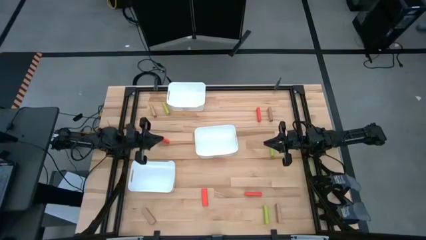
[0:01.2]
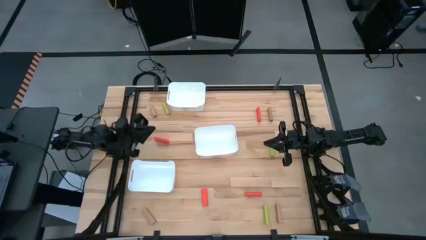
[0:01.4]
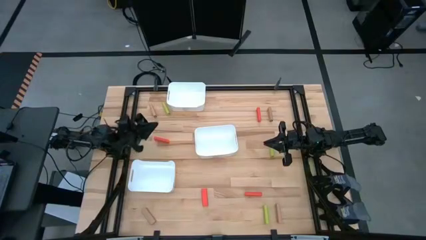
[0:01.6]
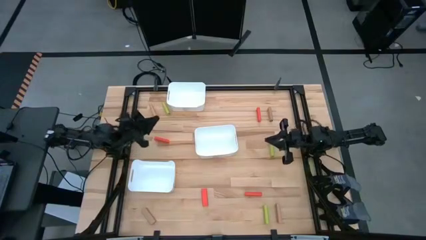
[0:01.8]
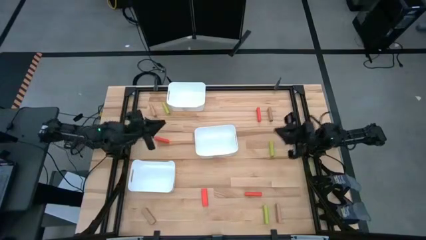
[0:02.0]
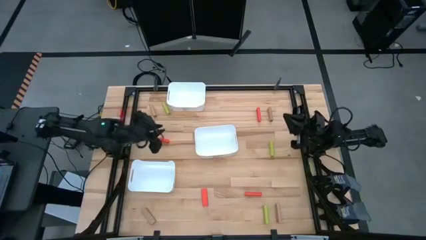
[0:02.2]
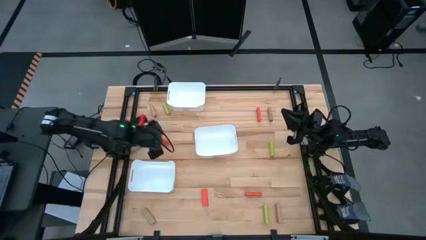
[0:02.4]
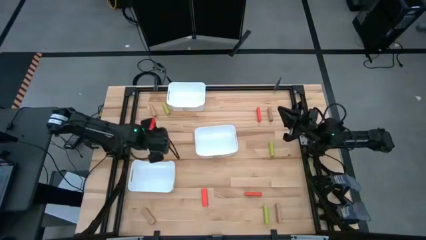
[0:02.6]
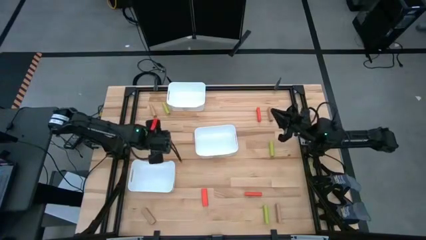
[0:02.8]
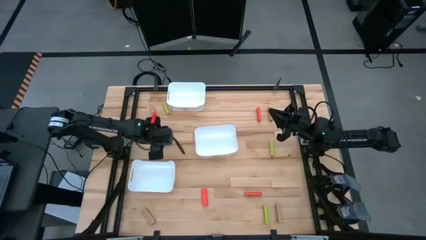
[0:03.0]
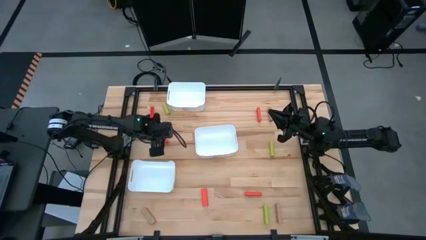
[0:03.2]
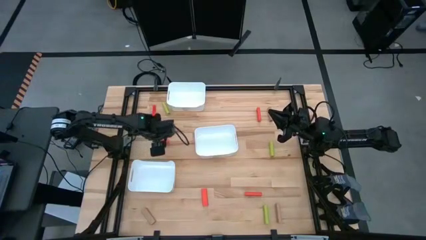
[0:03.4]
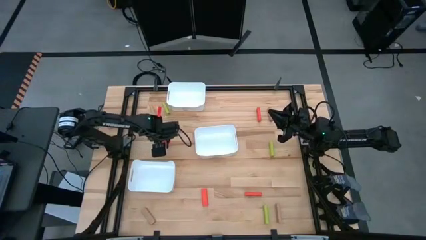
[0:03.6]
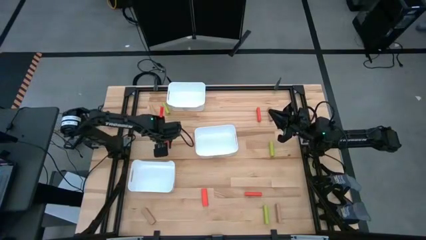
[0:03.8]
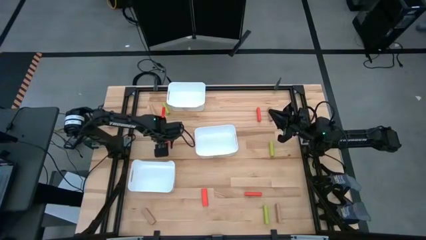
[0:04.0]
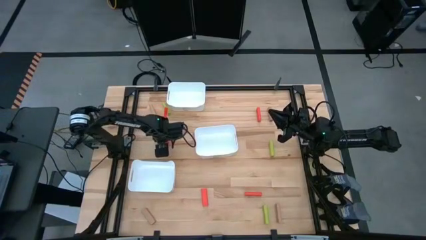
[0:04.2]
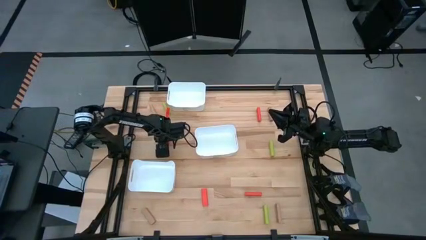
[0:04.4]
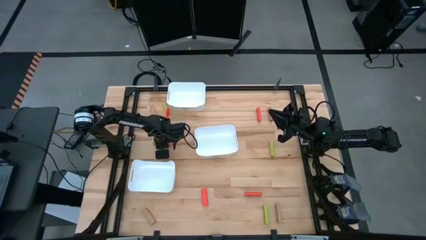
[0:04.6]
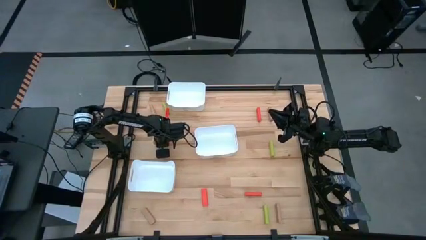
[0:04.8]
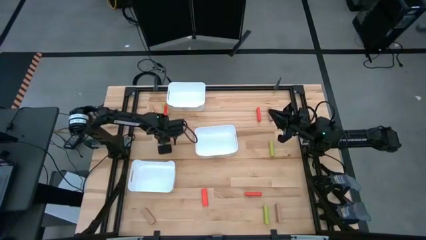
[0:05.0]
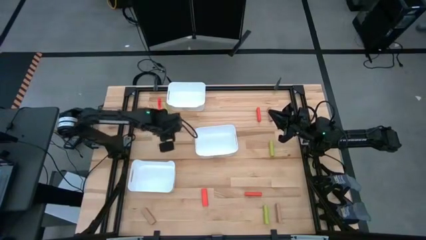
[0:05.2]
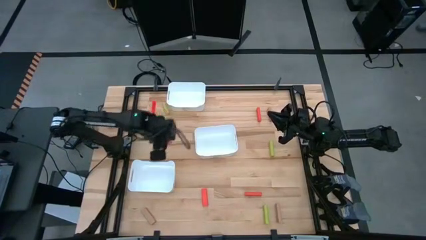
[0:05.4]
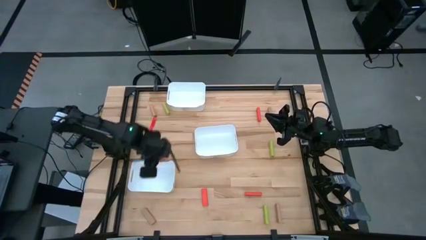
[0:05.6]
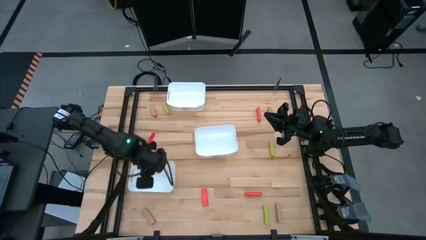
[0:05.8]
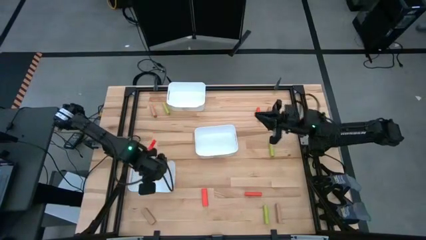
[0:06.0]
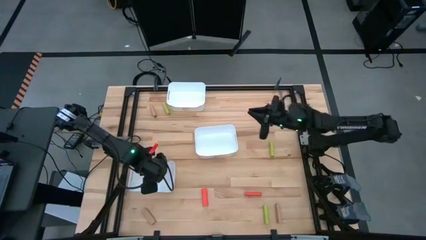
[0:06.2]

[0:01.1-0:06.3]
Task: Sort blocks
Put the orange block into the bottom white bin

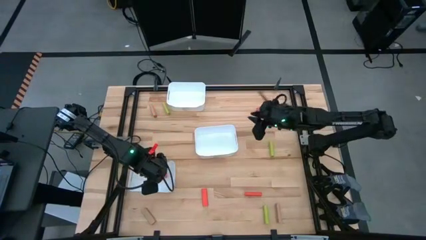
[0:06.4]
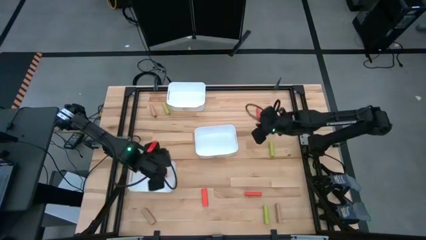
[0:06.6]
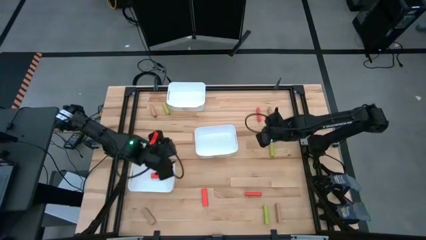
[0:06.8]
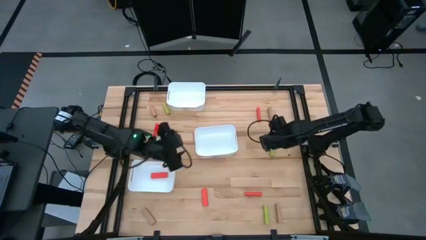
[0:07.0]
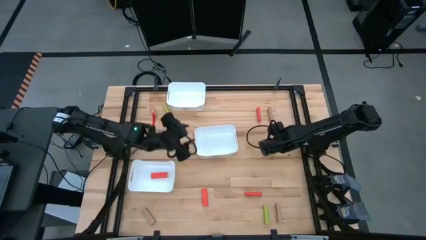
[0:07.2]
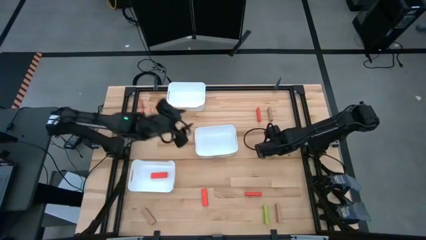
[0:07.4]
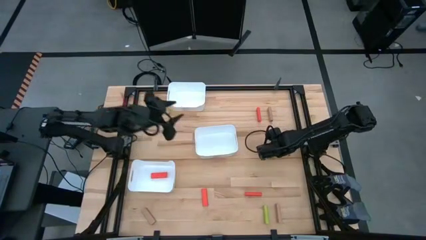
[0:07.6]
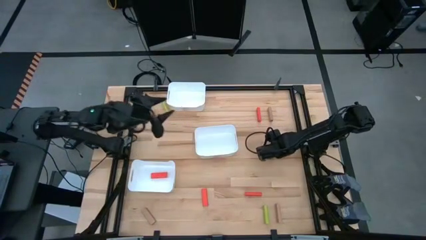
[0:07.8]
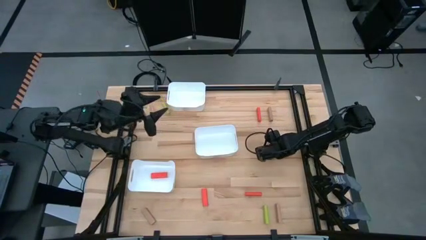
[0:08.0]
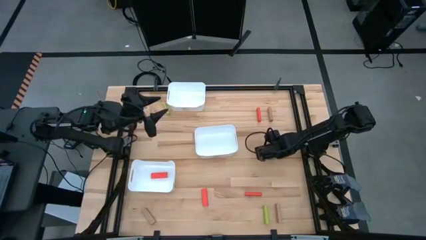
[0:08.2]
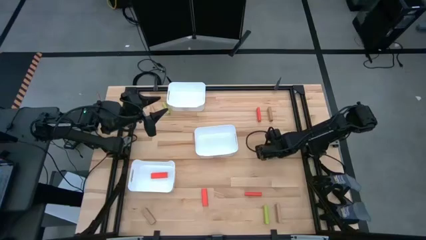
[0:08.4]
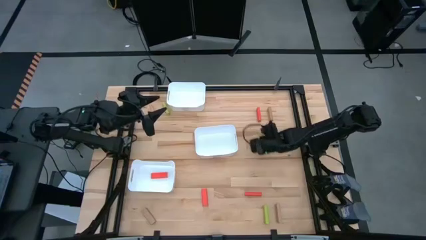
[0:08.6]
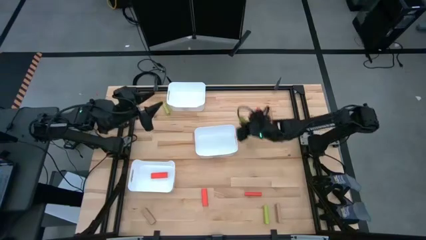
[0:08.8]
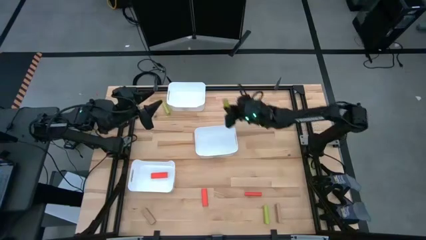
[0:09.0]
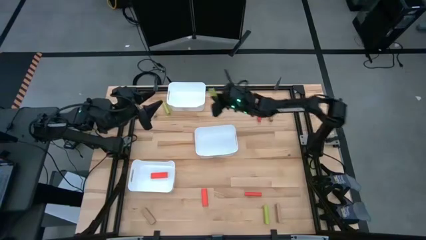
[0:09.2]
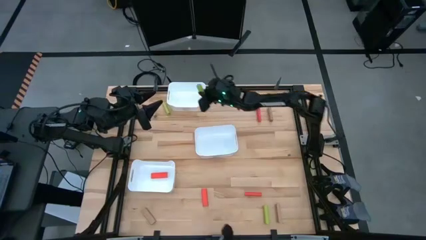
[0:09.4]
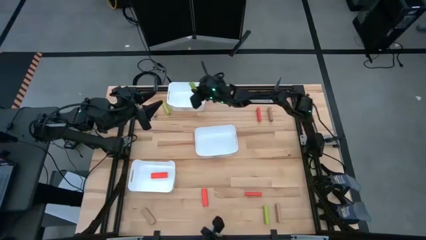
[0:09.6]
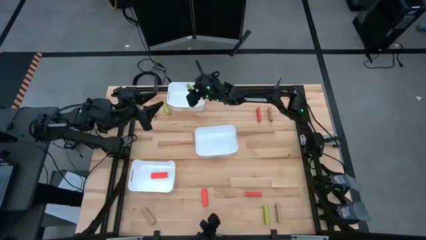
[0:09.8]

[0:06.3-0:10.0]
Put the green block into the top white bin

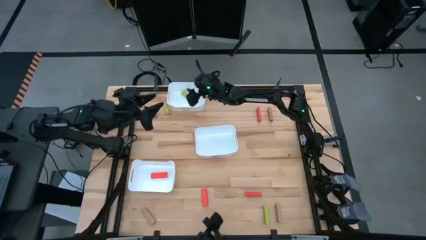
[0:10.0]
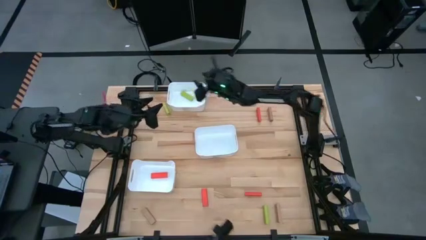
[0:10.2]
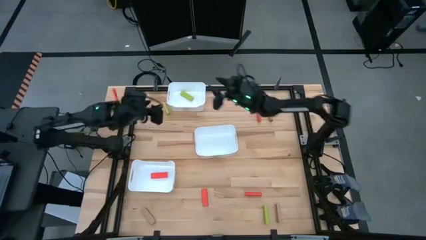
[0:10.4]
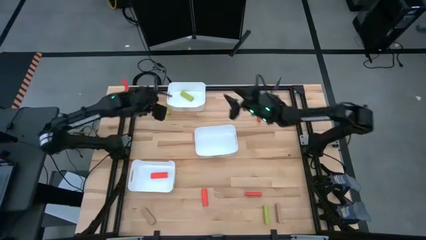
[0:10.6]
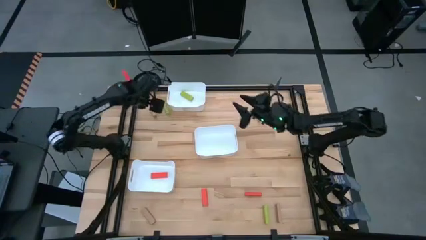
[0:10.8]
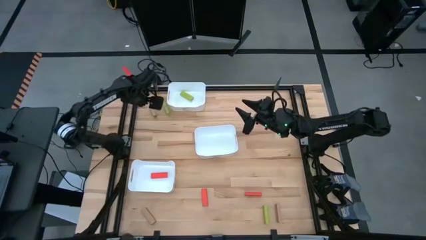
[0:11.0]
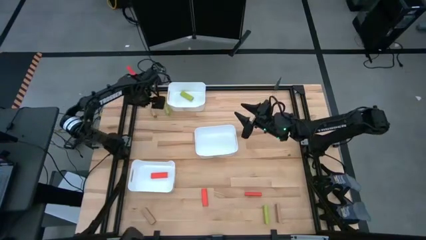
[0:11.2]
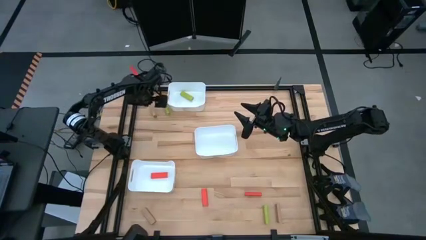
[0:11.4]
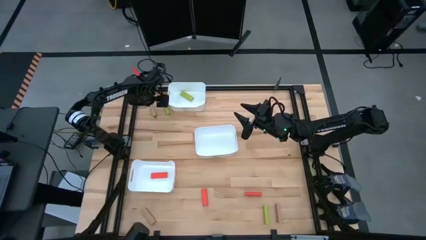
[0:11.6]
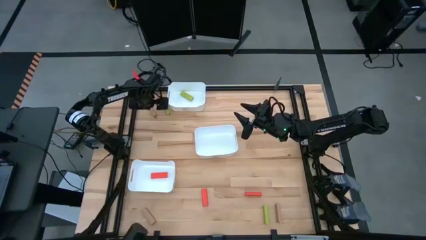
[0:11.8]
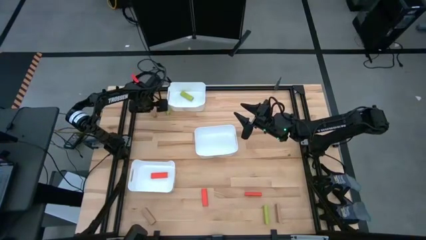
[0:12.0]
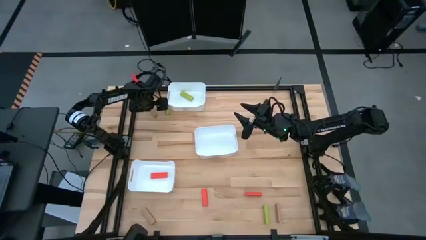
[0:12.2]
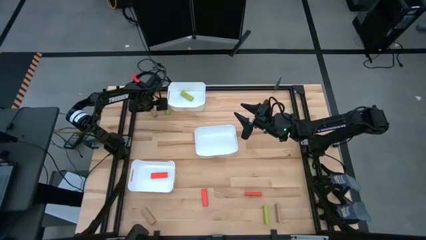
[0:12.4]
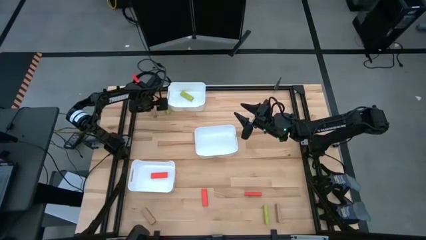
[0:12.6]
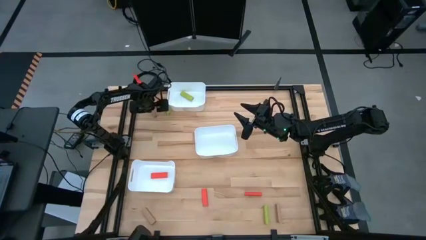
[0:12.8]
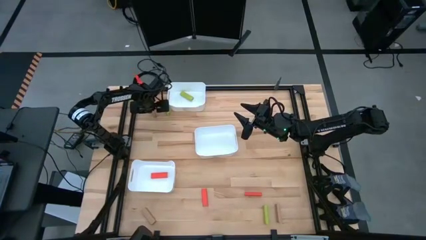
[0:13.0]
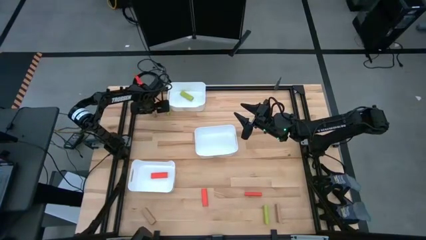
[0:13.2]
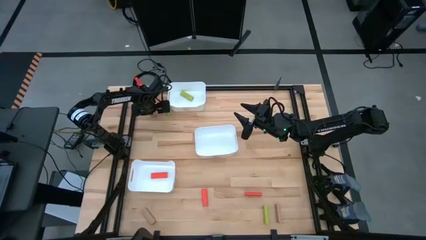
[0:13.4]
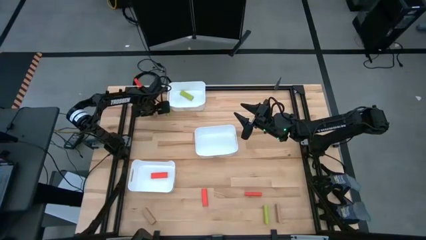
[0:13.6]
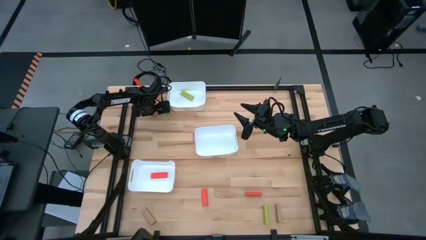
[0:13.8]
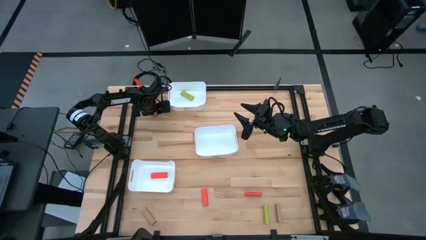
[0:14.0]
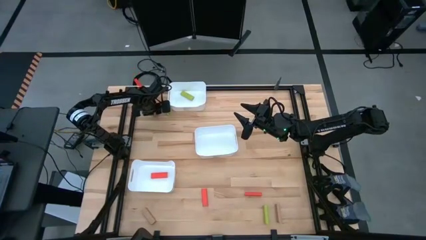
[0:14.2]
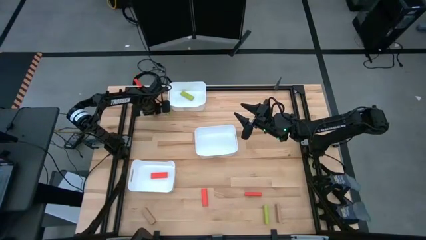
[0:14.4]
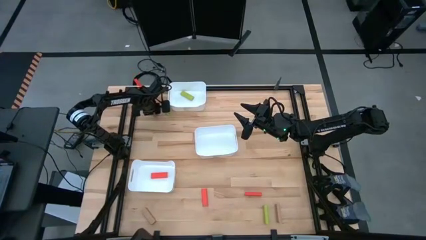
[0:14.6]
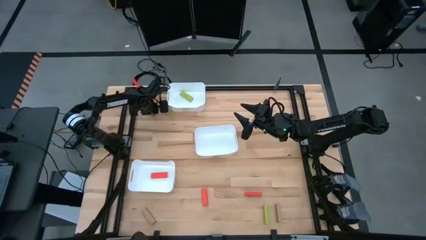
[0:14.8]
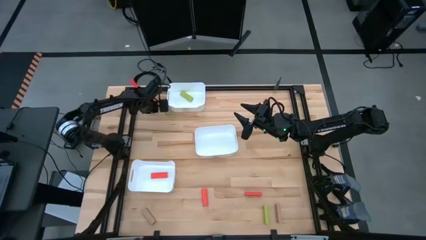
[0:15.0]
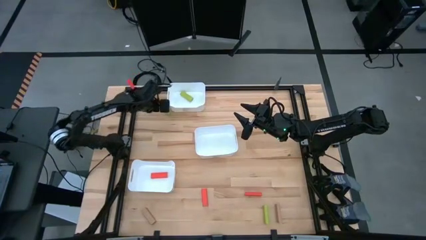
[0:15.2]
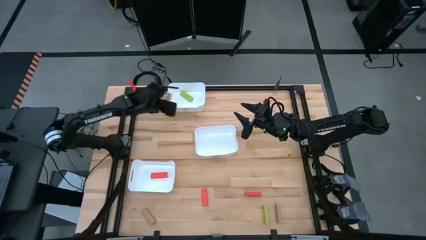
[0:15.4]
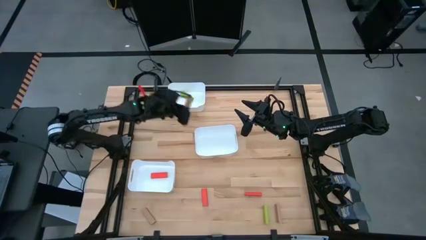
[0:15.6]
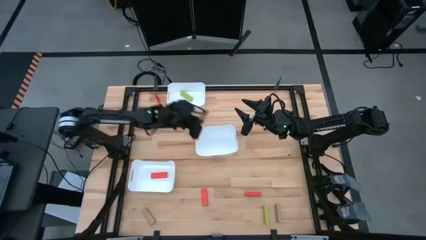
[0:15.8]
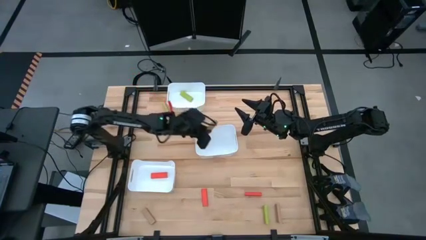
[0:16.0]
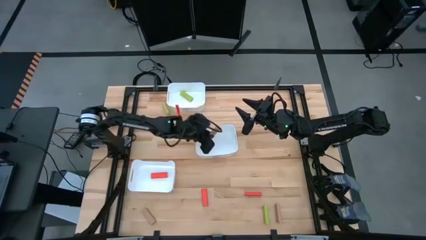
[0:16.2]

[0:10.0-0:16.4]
Put the brown block into the middle white bin

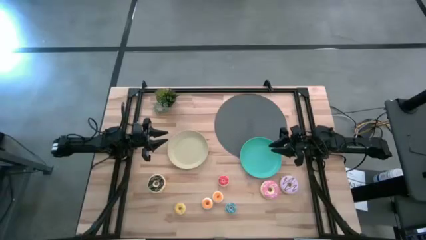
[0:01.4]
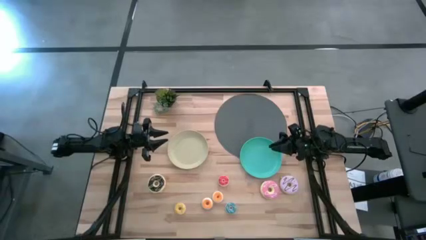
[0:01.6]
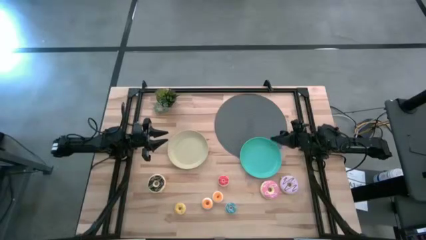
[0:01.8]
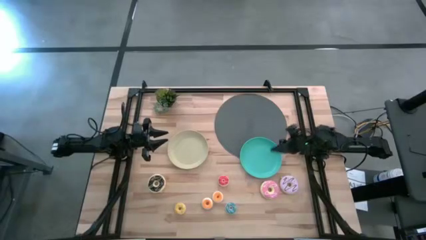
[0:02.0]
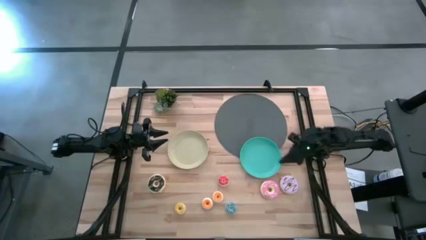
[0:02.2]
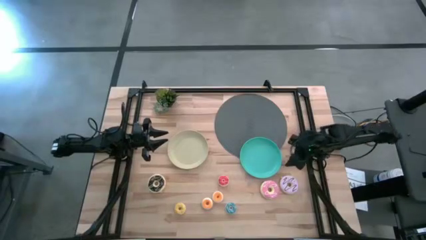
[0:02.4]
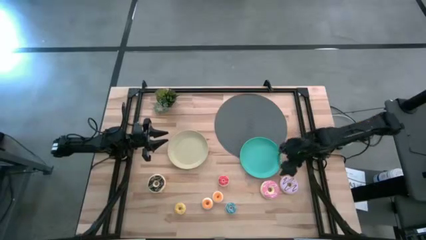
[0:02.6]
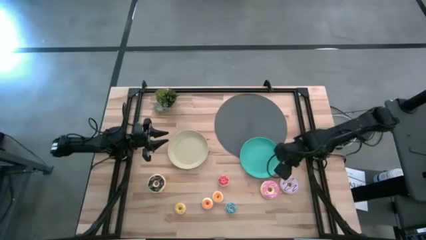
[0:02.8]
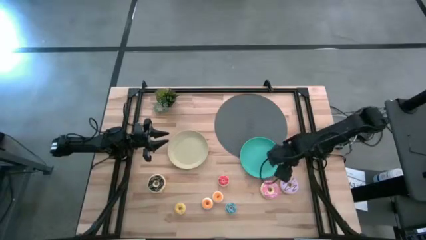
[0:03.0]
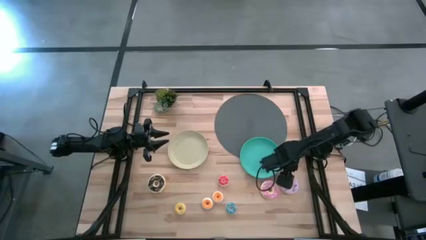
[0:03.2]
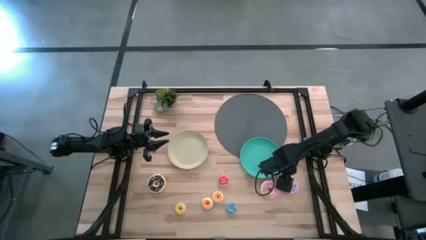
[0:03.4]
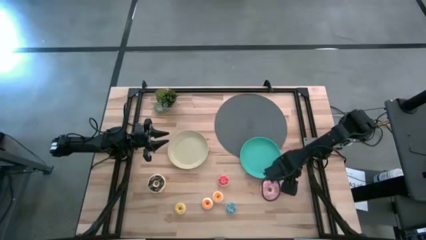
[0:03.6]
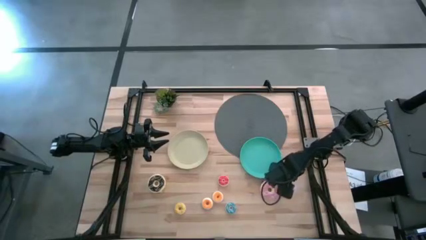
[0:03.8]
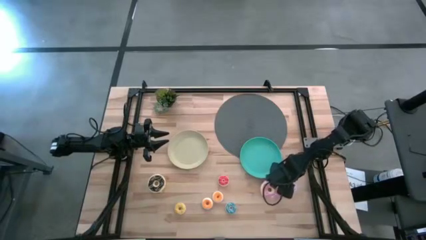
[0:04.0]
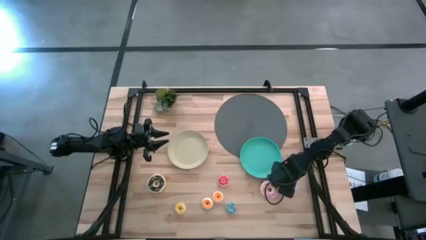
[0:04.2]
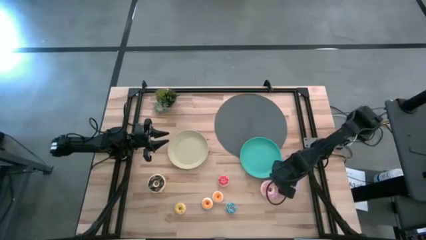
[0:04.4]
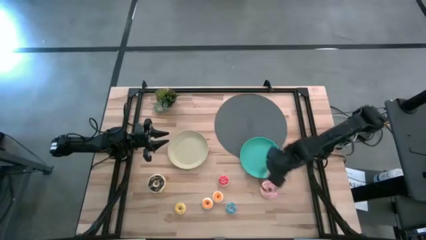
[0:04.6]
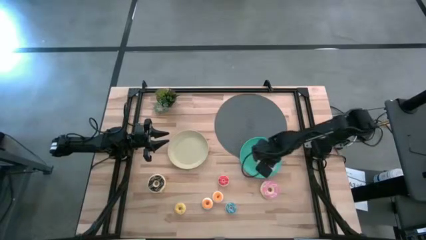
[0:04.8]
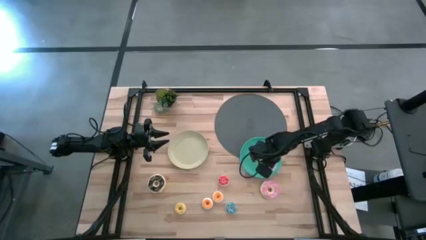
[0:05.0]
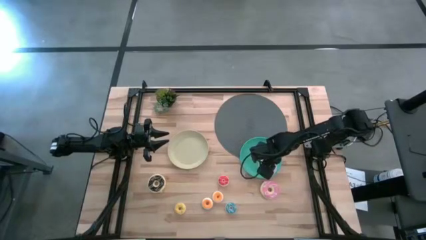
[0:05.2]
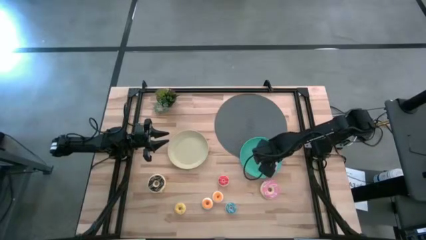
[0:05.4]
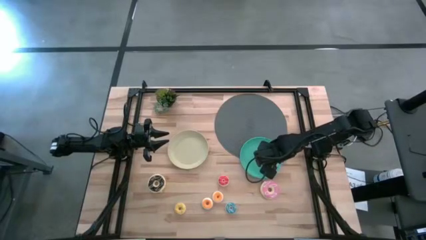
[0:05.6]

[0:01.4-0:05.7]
Task: Pick & Place donuts
Put the large purple donut on the green plate
